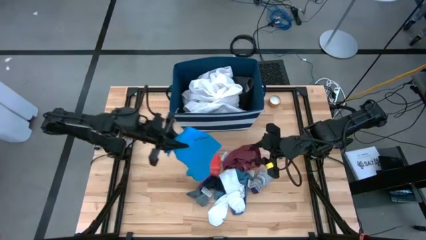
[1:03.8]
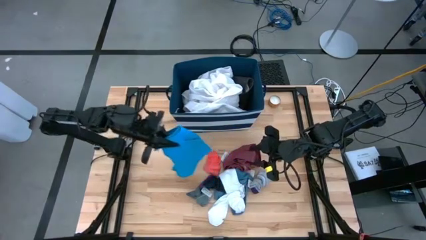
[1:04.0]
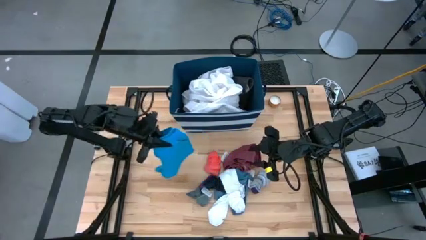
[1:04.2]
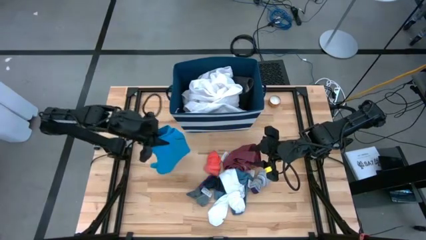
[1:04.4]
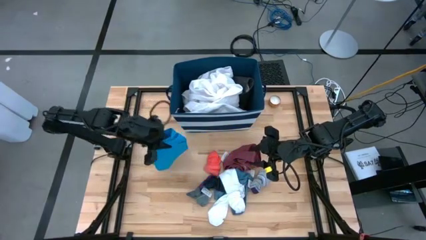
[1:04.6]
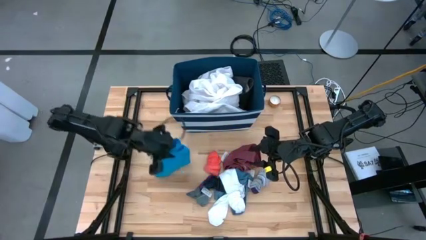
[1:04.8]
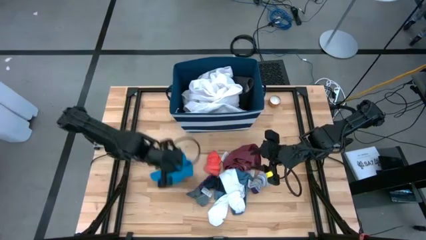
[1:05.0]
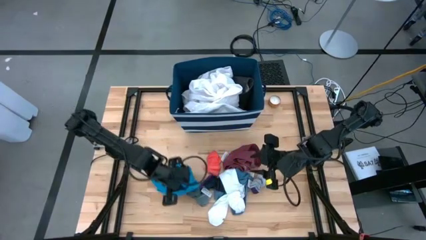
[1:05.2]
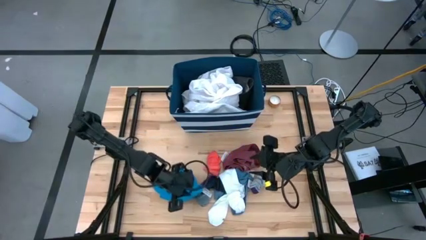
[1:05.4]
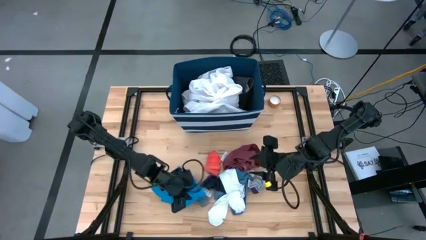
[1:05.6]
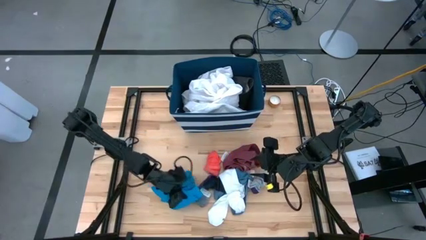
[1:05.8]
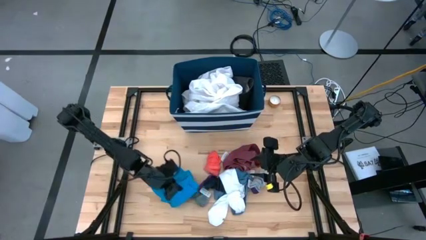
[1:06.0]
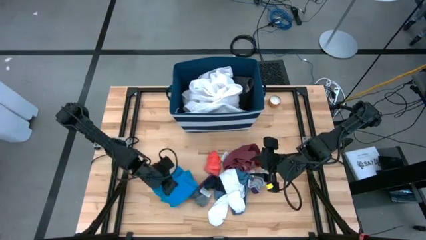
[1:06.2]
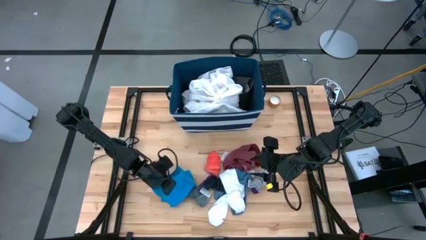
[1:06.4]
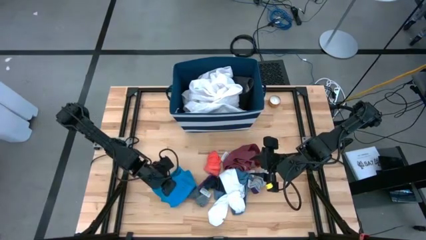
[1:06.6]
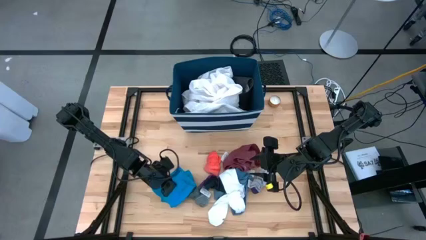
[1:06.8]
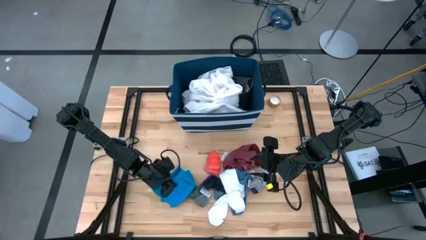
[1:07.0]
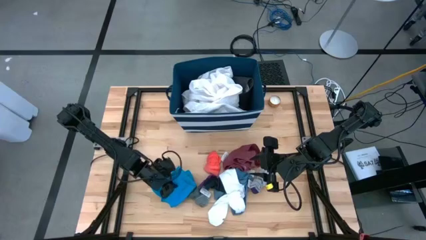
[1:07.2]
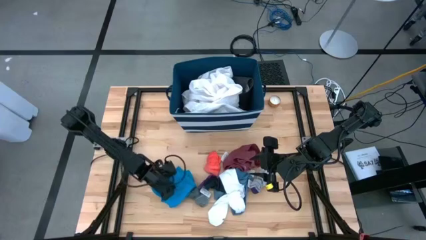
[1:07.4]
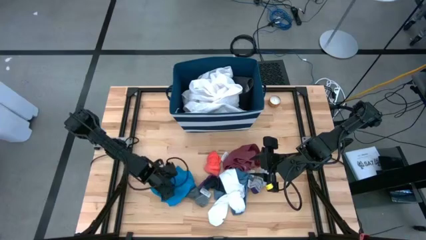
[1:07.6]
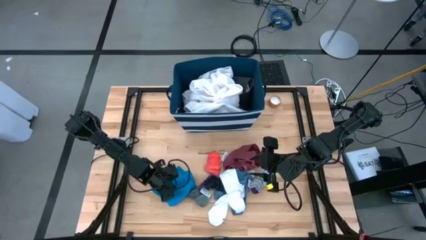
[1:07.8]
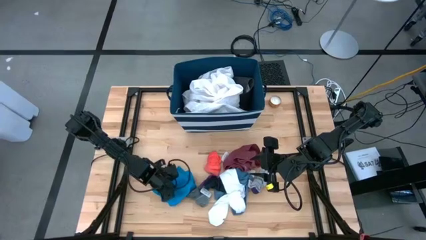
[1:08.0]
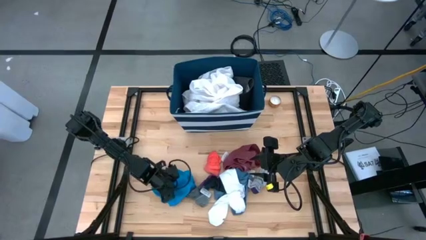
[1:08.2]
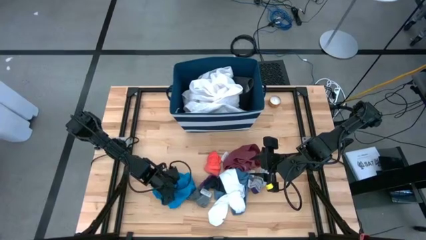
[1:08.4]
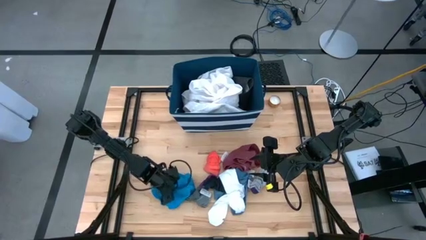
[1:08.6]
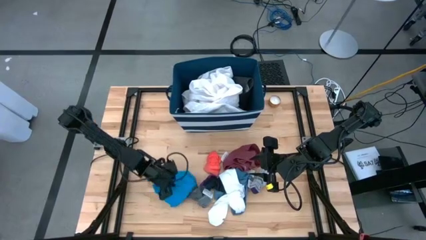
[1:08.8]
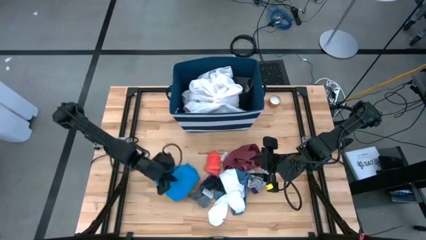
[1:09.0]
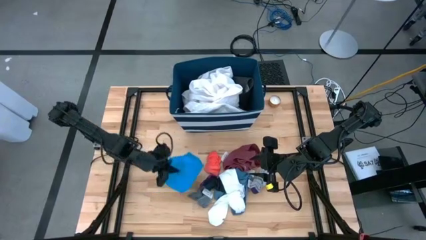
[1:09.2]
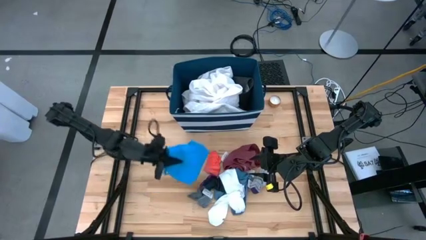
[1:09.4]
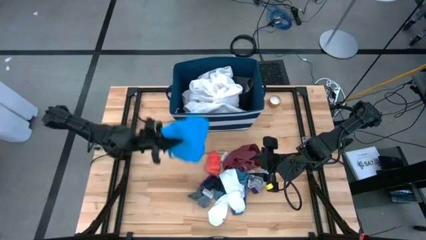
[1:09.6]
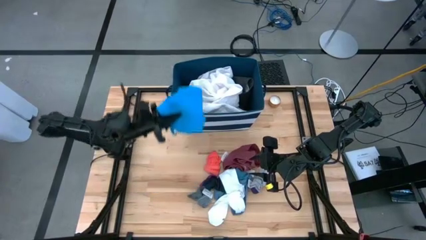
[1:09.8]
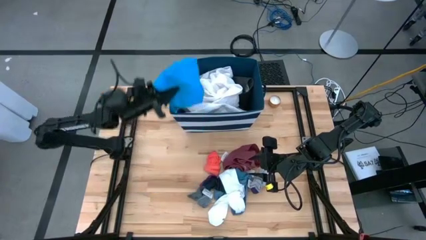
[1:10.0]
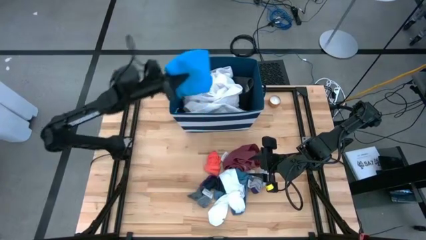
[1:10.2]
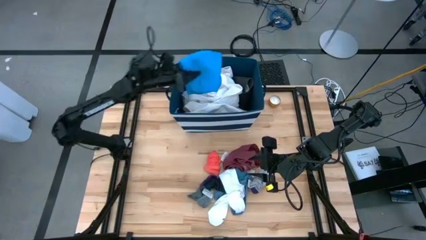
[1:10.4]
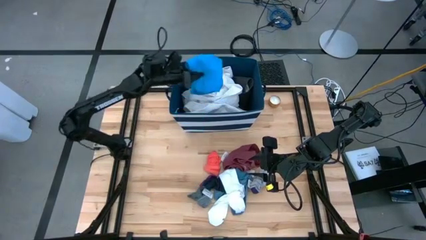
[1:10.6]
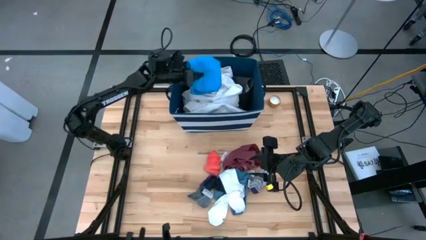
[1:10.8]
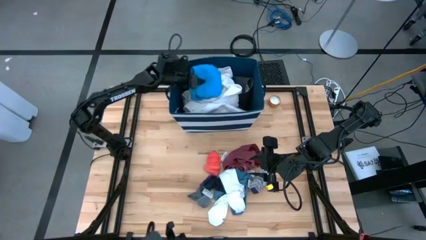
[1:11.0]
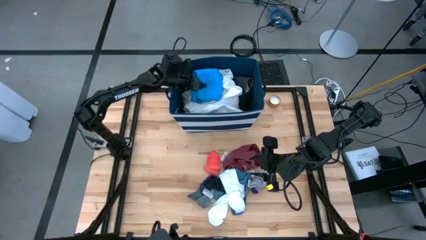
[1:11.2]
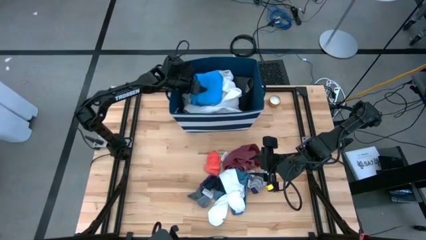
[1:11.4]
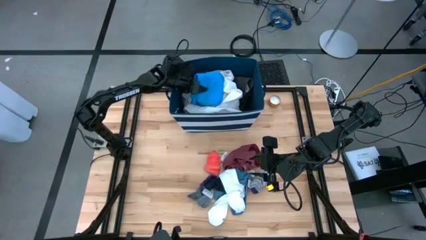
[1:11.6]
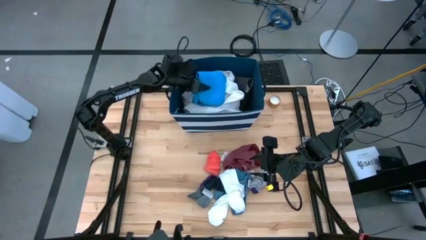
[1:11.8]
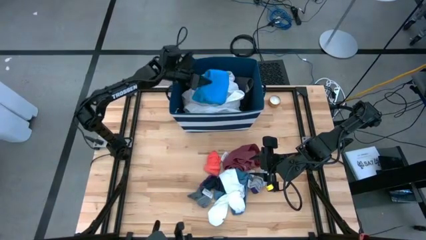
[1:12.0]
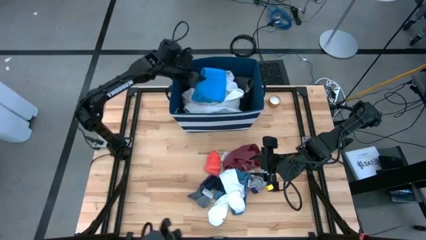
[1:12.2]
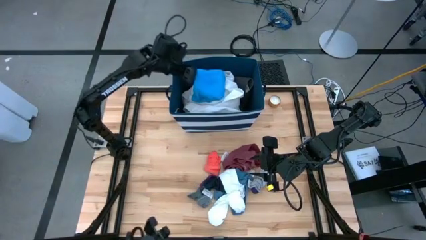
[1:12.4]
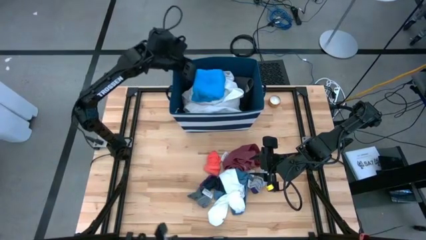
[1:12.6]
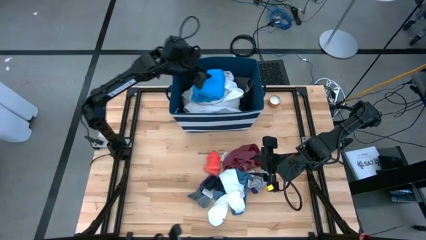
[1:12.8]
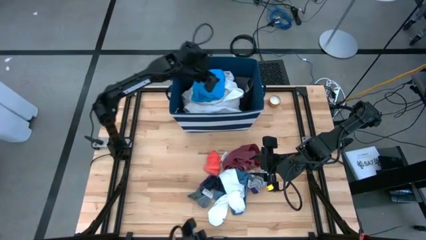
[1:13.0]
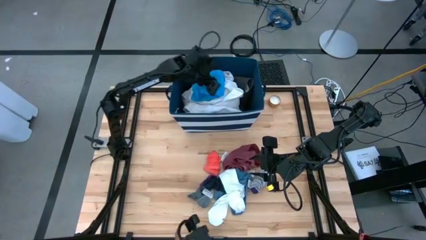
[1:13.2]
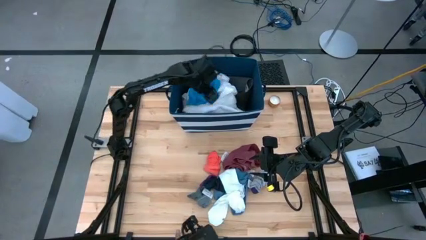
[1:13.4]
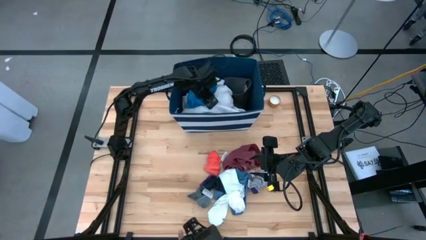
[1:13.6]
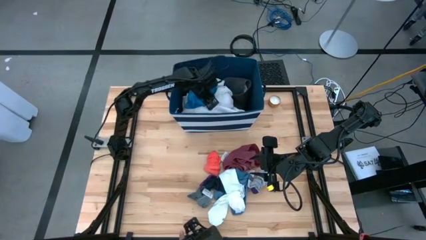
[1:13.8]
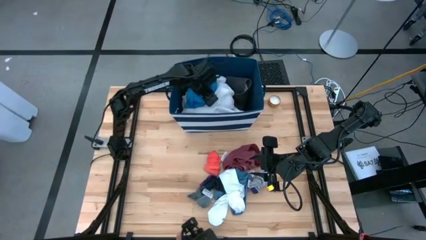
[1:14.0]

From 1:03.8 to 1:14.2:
Task: Sort clothes
Put the blue shorts into the blue laundry organizer

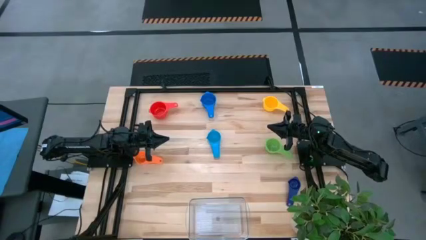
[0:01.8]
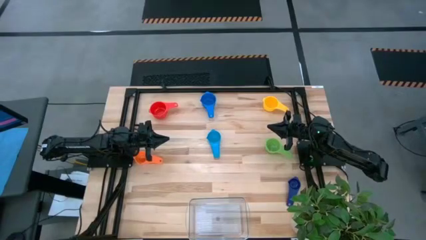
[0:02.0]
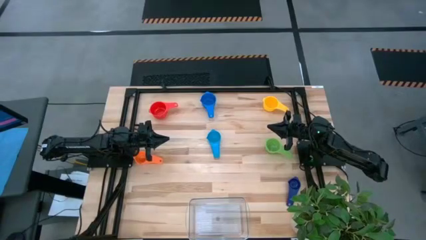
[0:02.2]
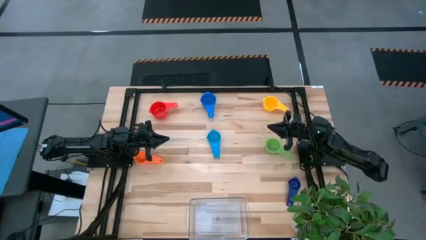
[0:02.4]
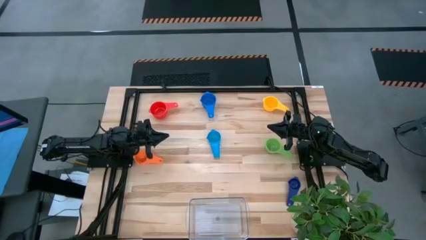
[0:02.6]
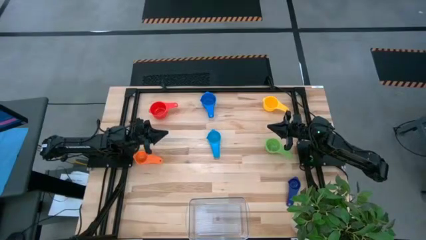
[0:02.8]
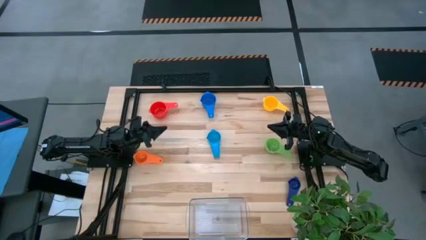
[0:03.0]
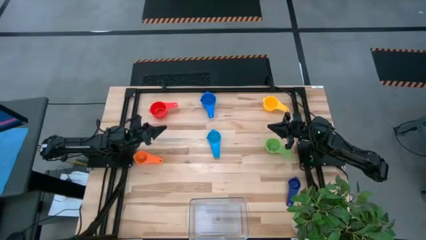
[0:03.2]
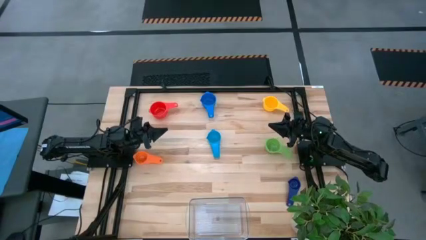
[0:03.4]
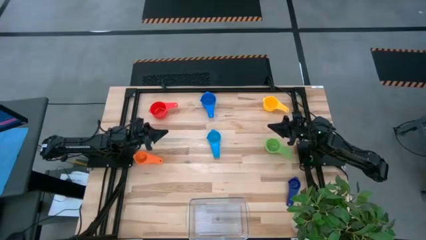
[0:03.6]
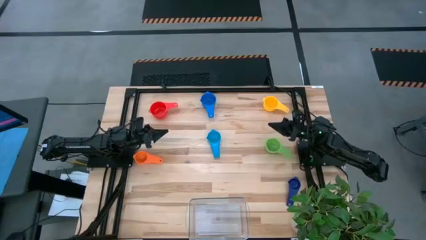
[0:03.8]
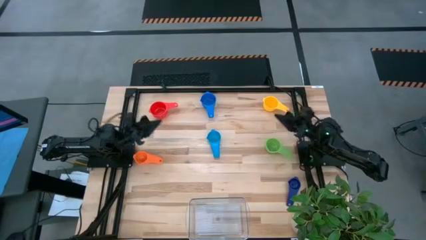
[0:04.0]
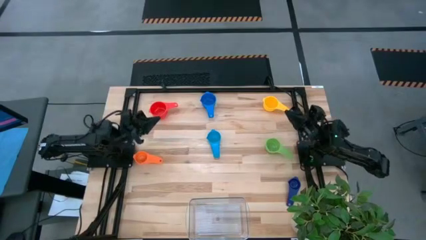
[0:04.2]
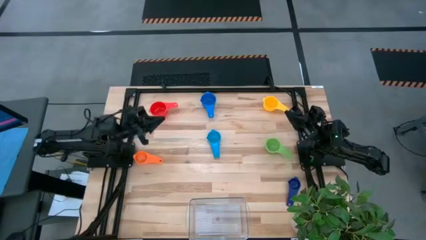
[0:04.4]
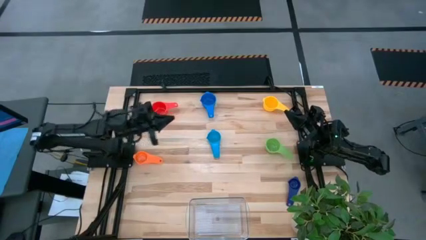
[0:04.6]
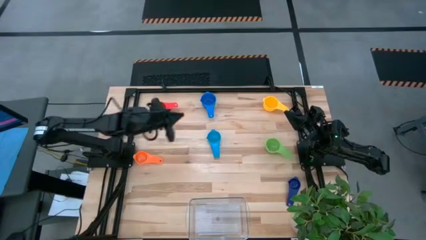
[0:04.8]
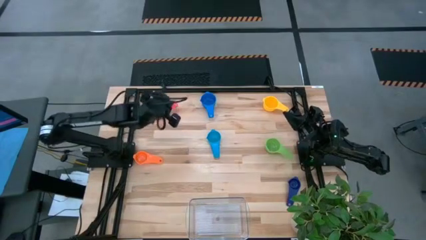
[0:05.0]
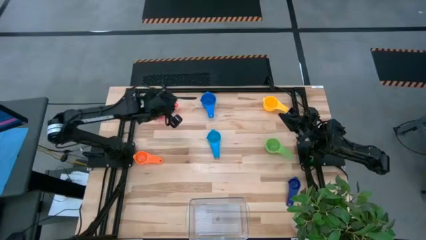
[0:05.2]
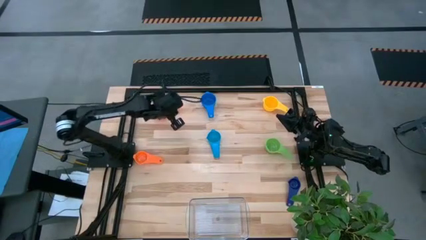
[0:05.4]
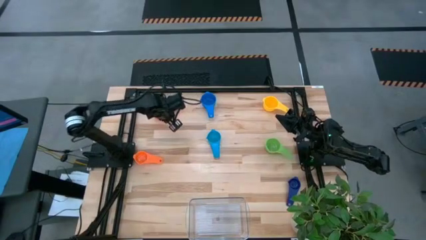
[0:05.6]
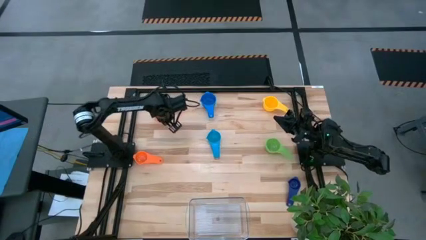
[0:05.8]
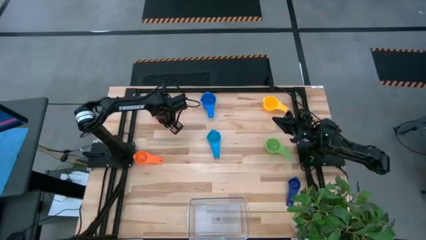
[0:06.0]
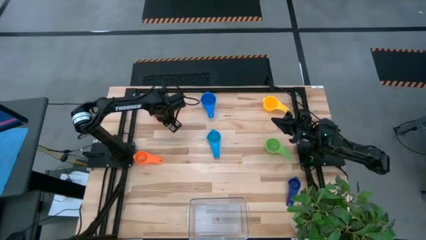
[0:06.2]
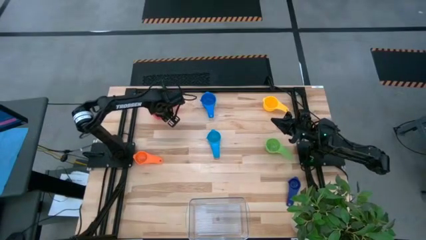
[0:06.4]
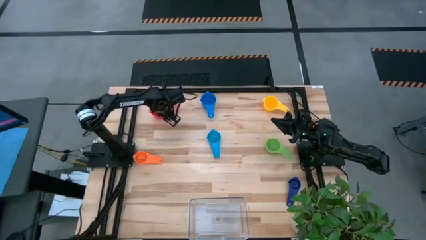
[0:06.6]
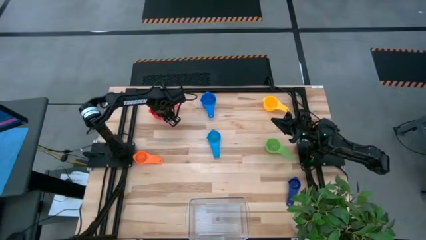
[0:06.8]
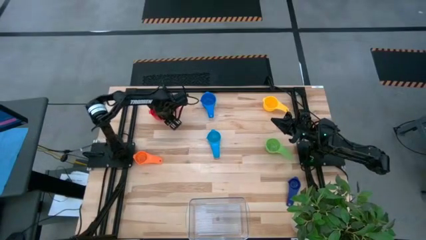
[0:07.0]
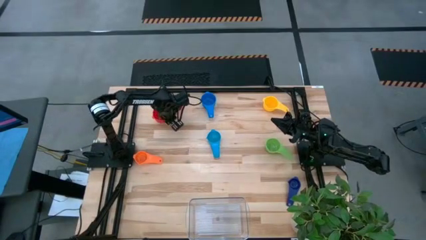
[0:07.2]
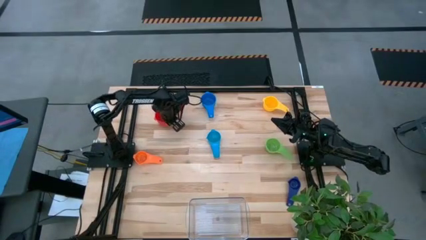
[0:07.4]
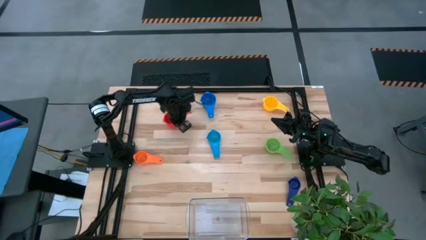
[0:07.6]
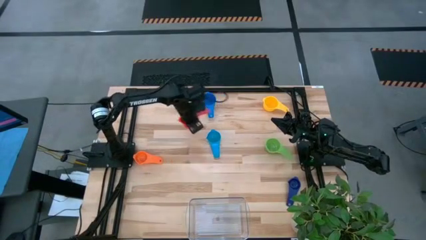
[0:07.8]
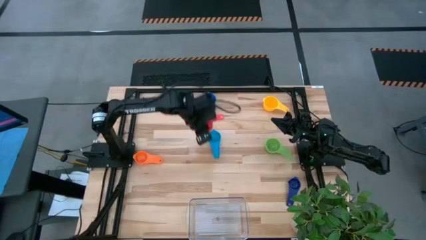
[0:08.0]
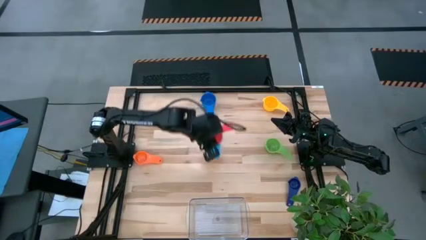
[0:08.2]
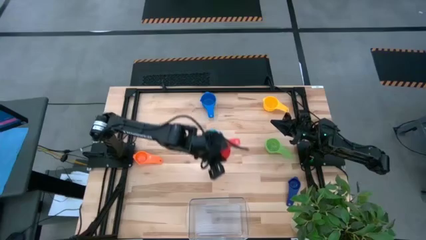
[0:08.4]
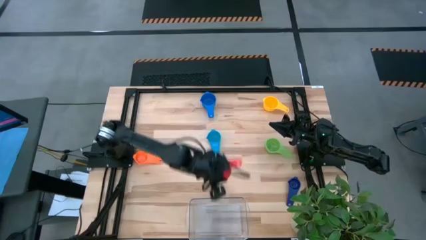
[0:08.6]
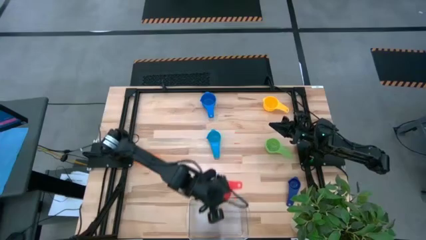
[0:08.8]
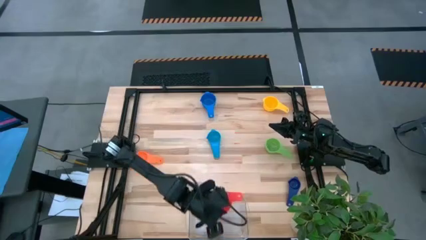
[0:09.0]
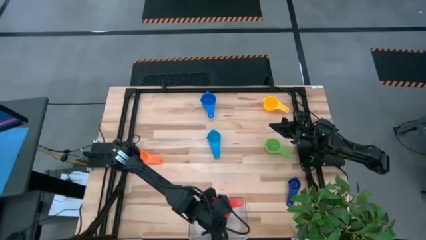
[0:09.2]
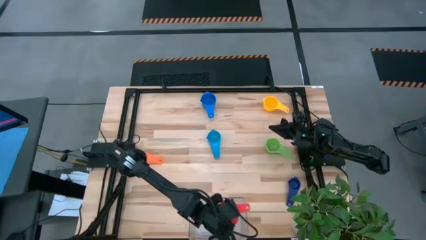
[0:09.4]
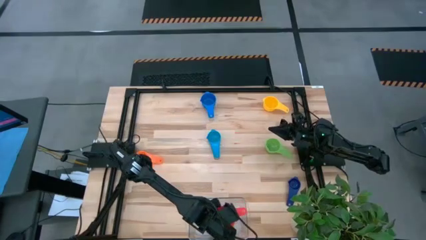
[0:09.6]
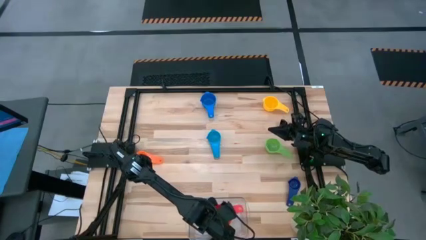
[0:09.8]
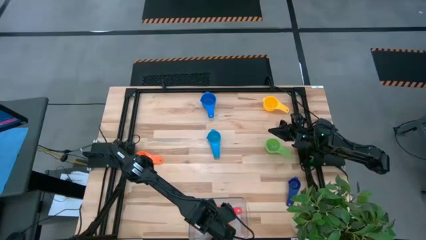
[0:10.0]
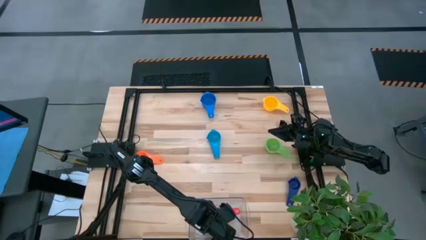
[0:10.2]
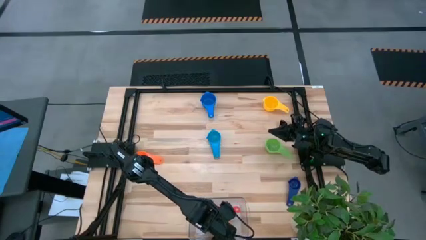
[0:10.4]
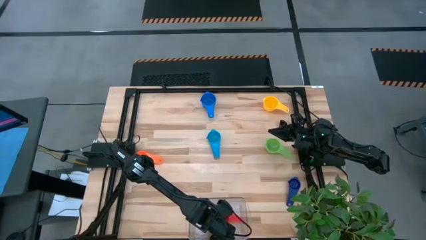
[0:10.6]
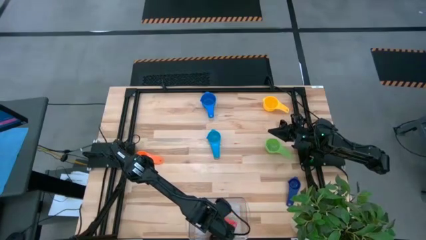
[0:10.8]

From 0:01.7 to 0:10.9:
Task: Nest measuring cups in basket
Put the red measuring cup into the transparent bin
